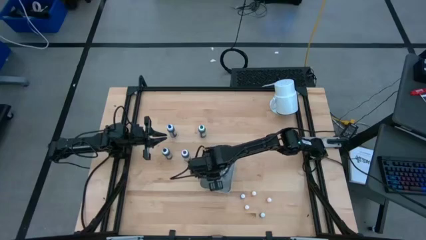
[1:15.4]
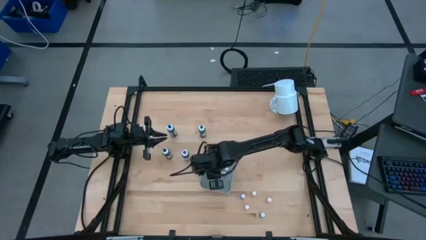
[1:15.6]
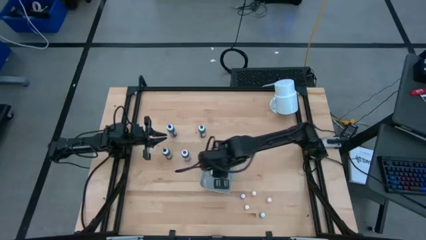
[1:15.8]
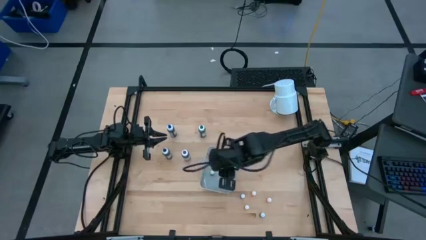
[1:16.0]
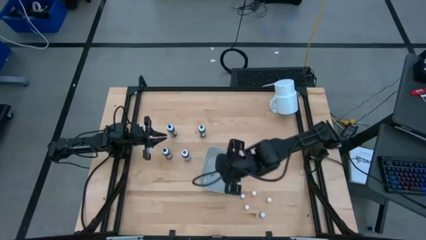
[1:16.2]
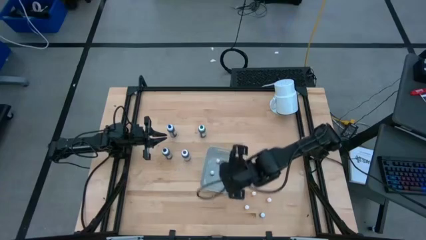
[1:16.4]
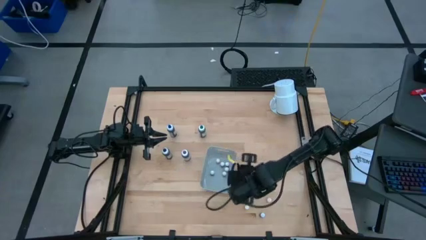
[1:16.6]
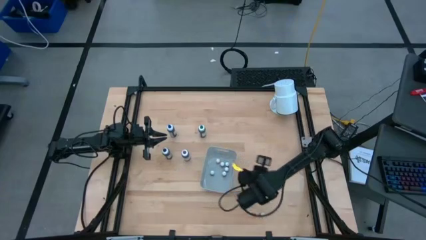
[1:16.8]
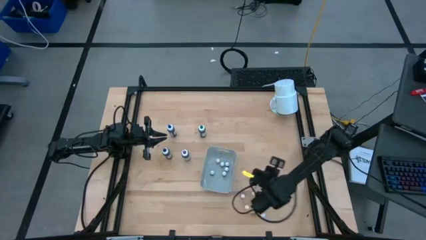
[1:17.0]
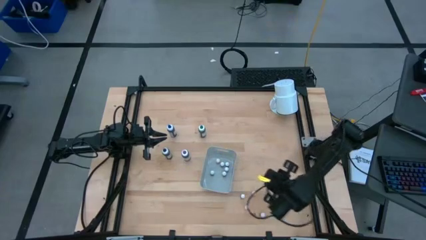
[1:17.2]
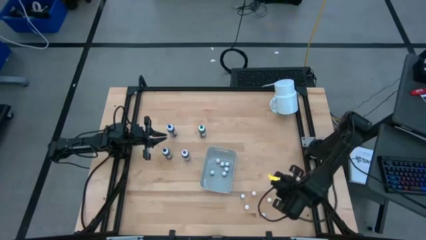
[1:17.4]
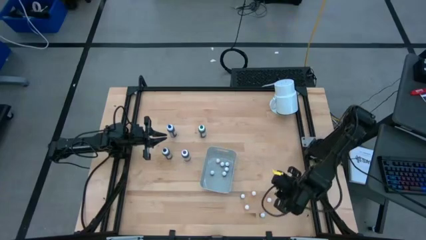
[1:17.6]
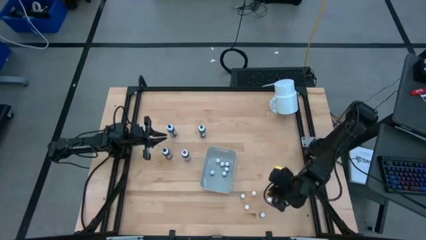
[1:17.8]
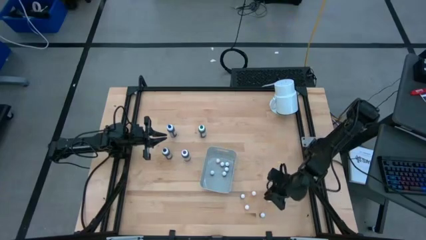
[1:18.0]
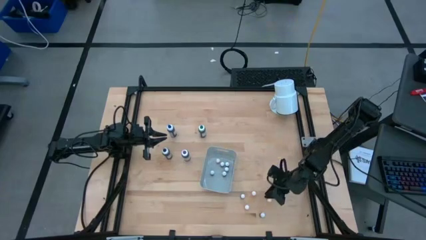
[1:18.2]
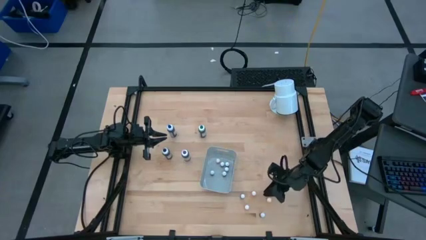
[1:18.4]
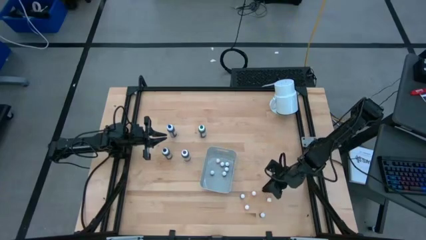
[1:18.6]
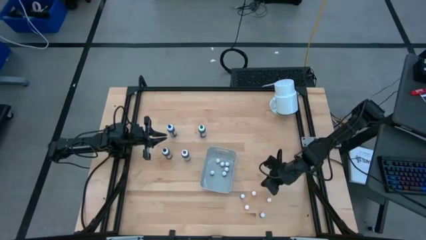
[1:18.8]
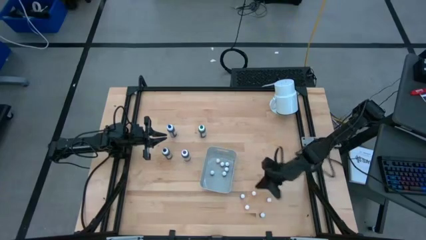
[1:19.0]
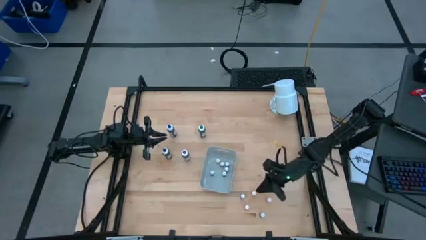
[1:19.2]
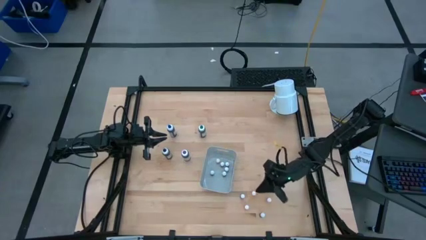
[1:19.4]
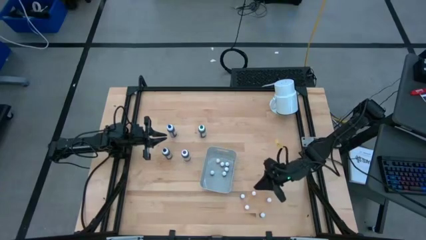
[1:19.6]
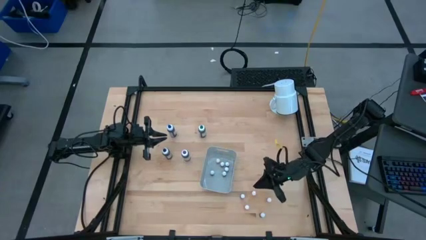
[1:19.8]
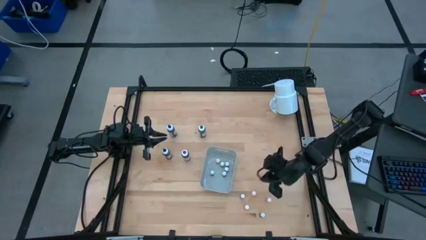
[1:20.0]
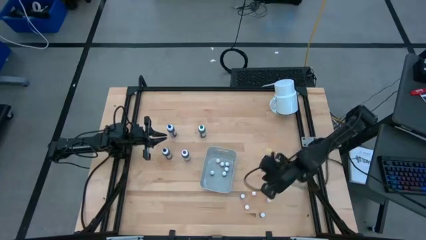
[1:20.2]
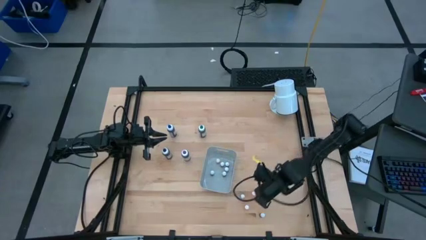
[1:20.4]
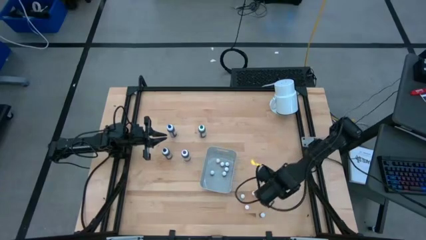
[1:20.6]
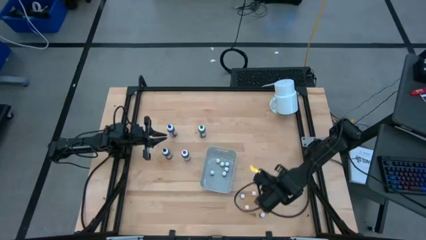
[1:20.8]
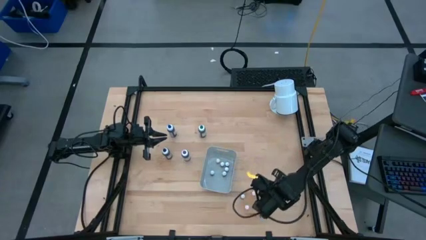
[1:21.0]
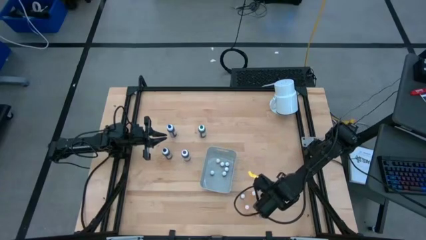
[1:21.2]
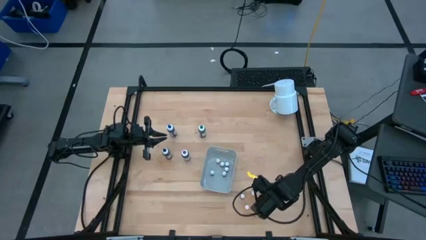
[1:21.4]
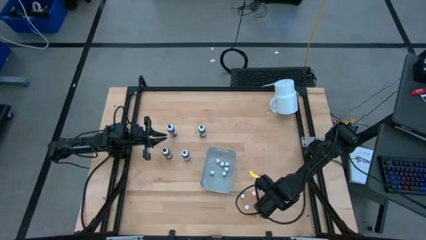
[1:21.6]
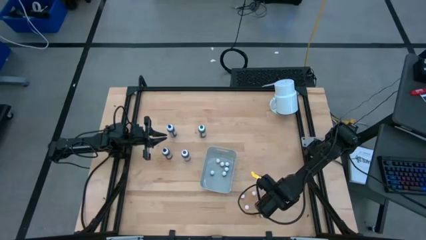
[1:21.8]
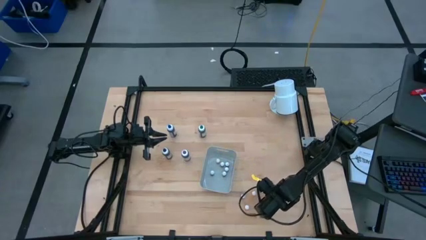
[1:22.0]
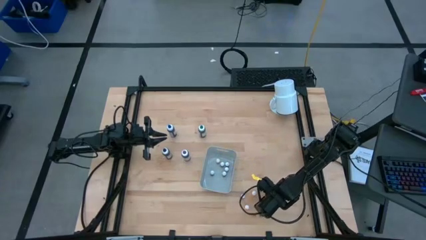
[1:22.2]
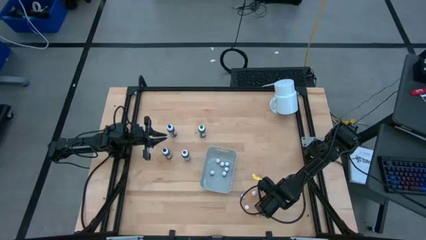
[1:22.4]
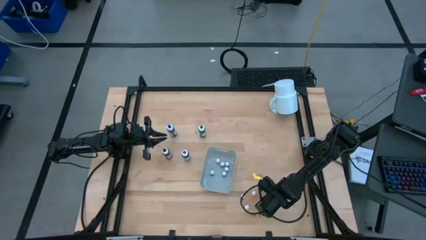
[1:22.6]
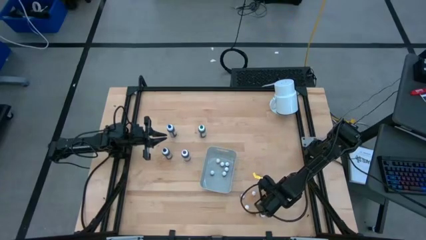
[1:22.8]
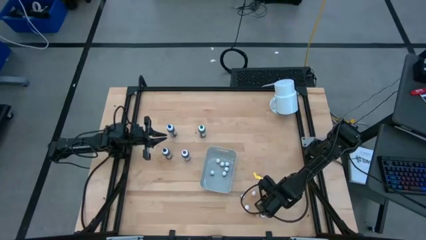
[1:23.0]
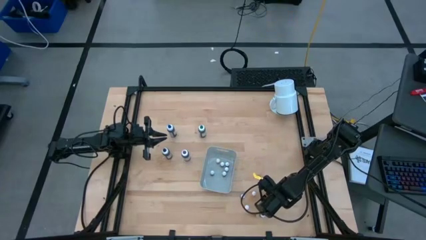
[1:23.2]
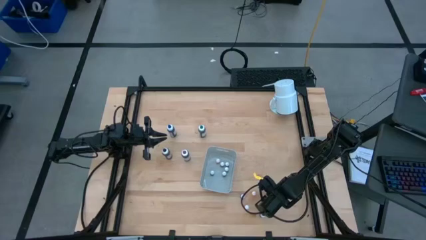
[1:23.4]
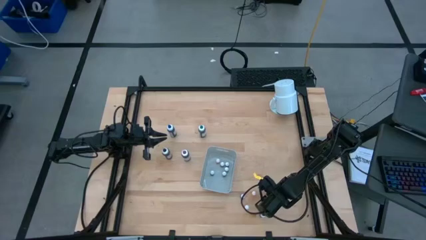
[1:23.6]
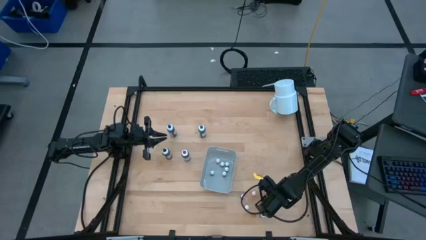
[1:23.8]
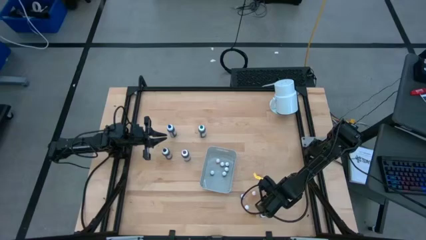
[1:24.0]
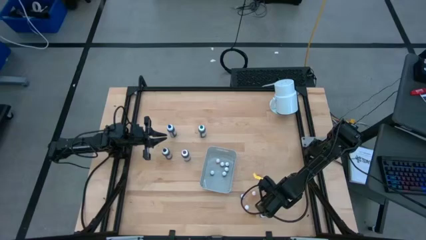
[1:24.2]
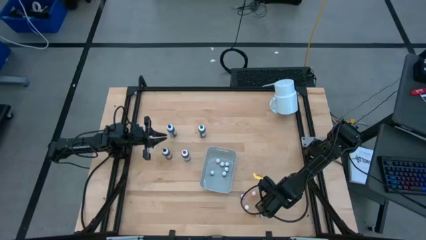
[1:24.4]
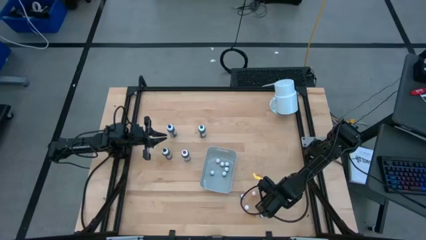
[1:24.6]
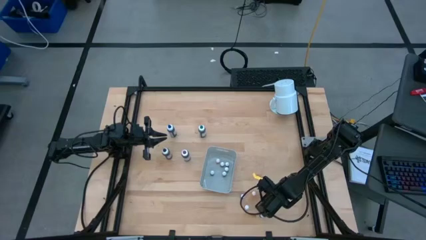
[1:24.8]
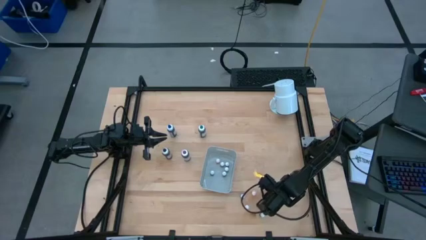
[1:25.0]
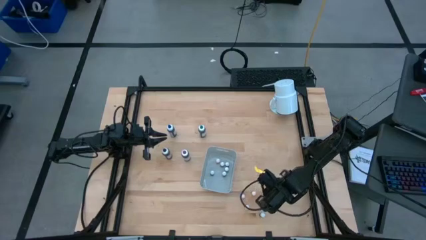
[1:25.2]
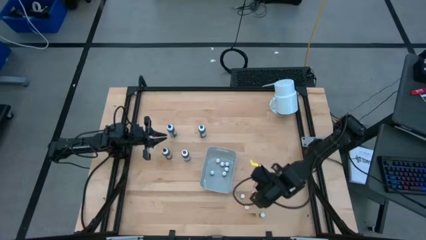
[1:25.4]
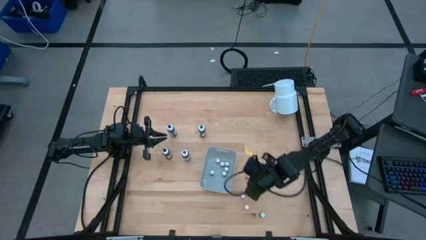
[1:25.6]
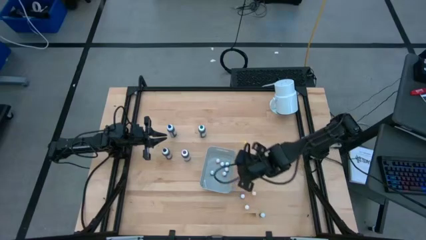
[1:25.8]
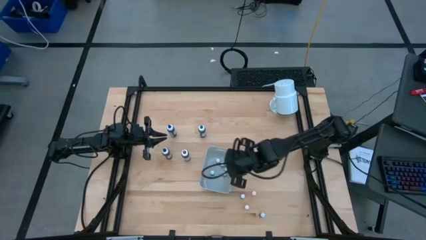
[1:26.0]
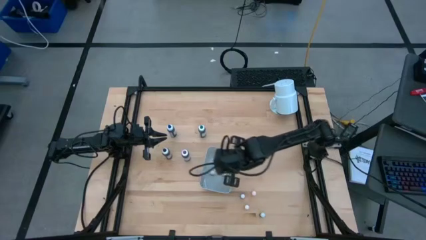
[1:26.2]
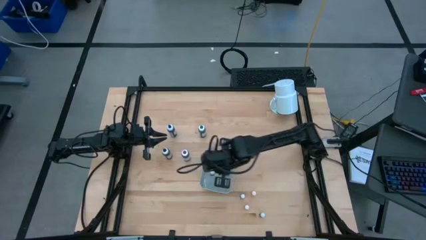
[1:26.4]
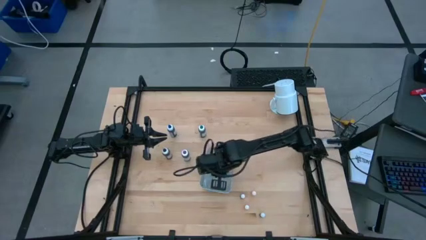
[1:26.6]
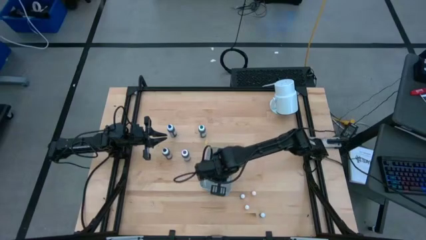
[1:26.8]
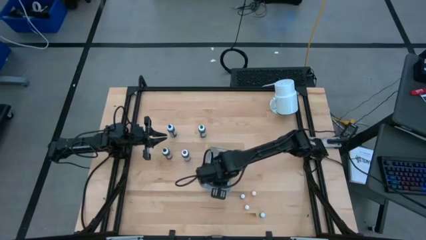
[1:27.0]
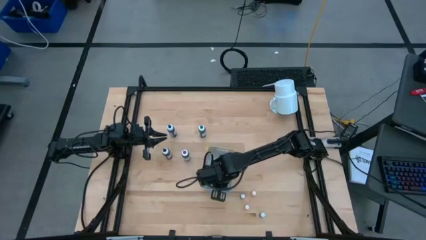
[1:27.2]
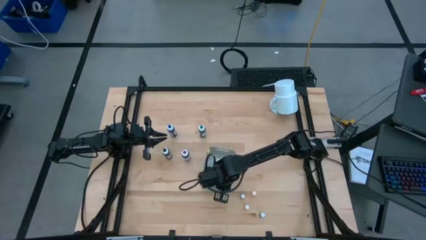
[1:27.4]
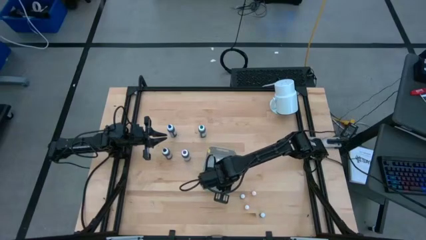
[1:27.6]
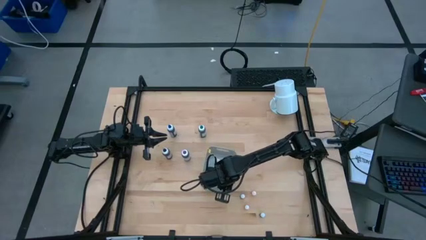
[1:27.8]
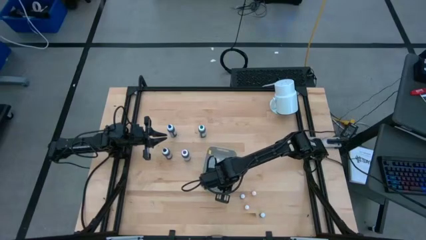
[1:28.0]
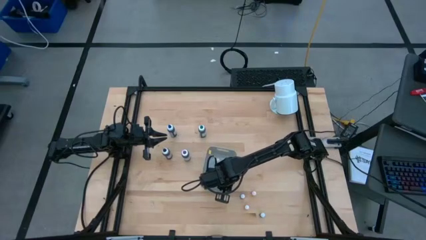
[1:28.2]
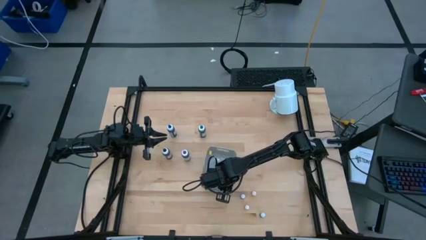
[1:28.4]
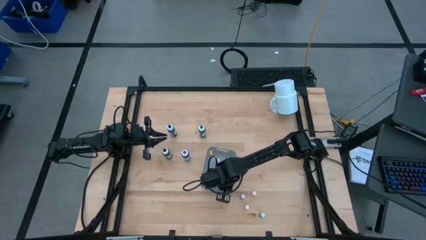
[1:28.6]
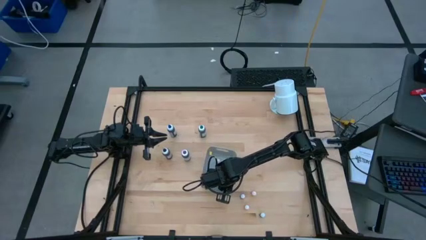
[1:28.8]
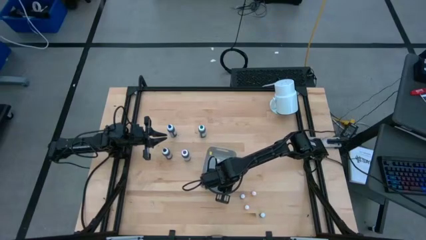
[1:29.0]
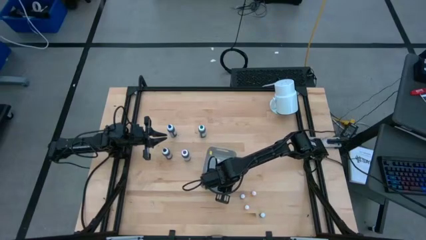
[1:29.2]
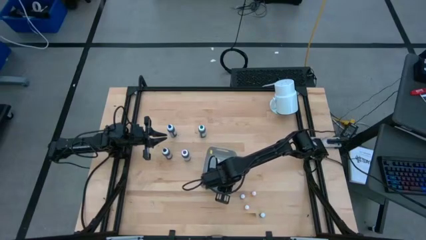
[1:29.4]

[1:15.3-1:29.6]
Task: Pick & Place food coloring
Put the small yellow food coloring bottle into the white bin

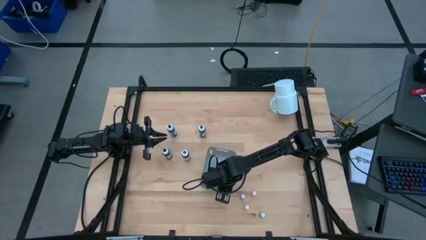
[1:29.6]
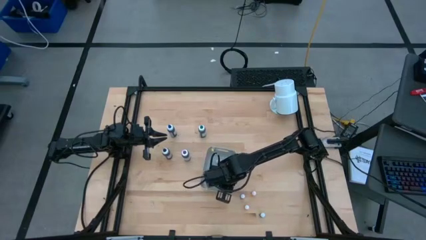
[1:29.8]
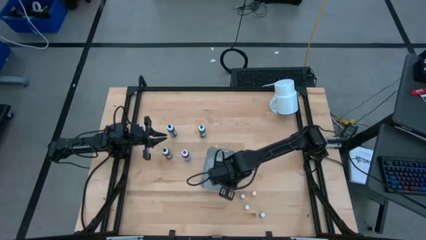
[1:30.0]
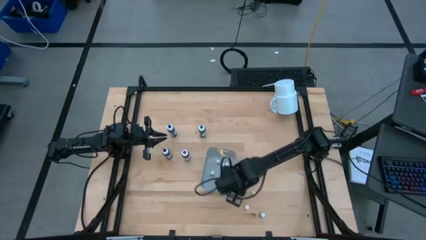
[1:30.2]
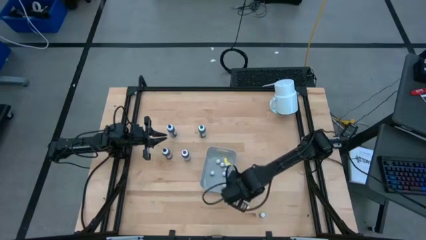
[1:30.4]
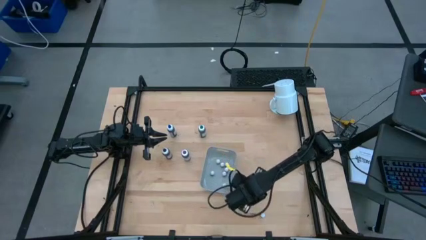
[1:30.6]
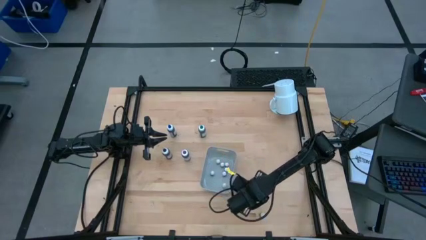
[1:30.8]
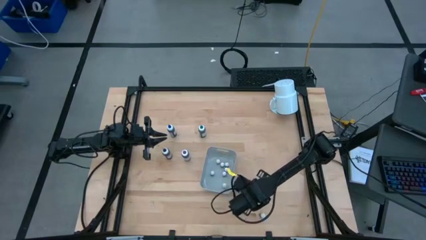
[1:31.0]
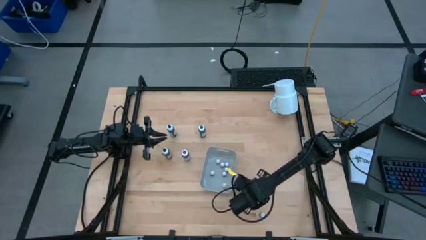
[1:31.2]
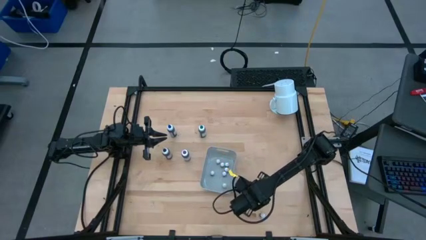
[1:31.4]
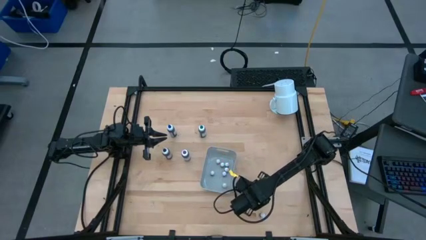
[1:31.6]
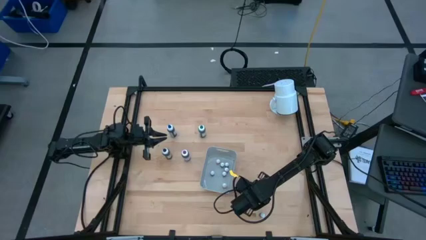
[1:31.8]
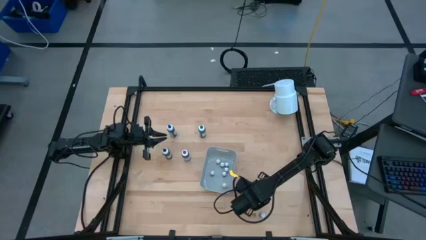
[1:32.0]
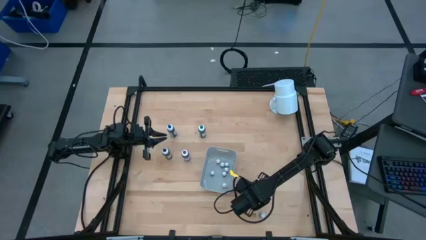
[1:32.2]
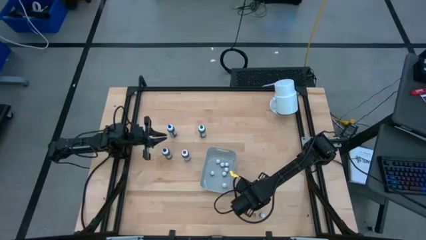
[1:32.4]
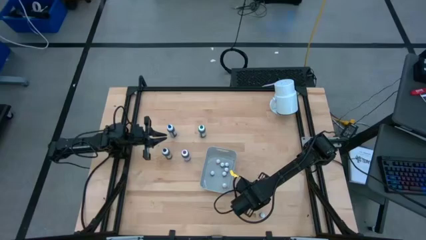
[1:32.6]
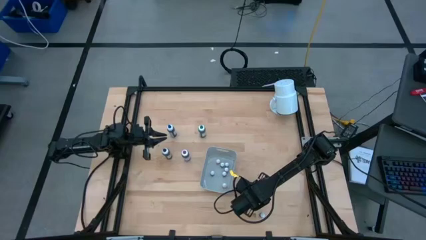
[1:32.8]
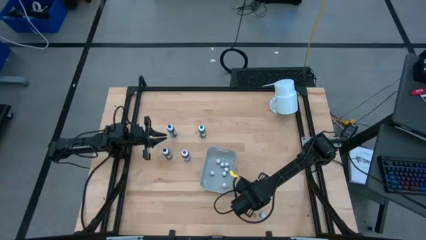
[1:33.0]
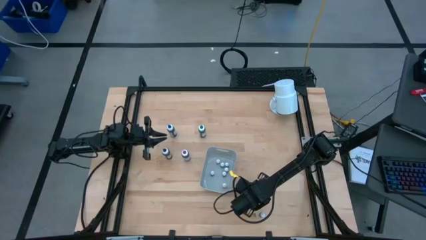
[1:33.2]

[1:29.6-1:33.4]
Put the small yellow food coloring bottle into the white bin
